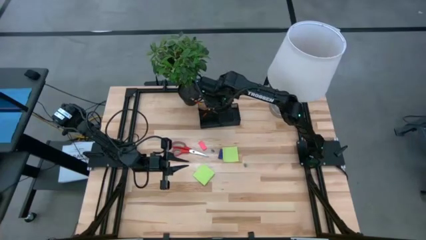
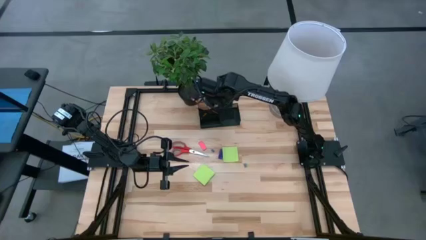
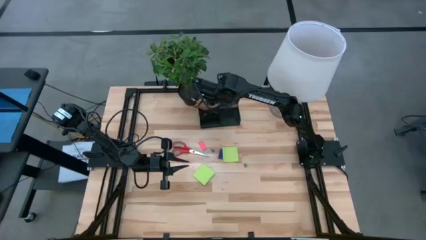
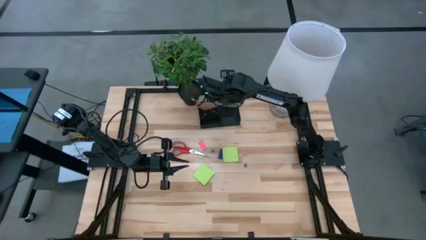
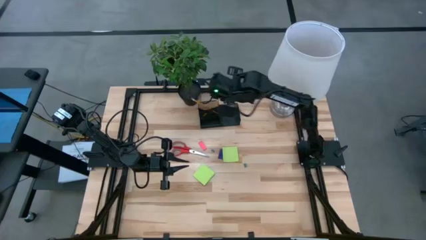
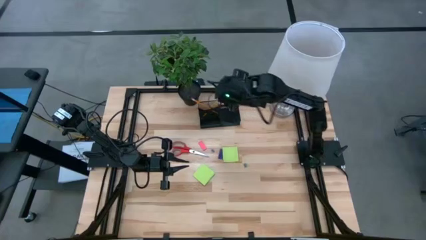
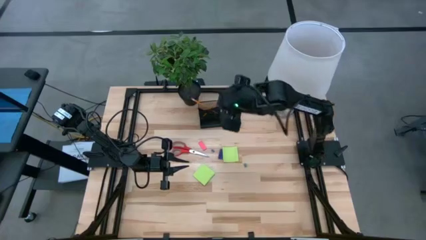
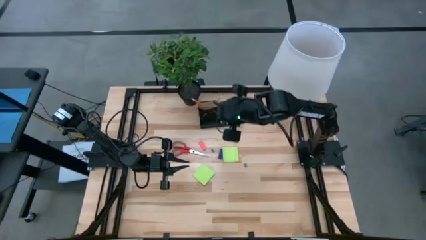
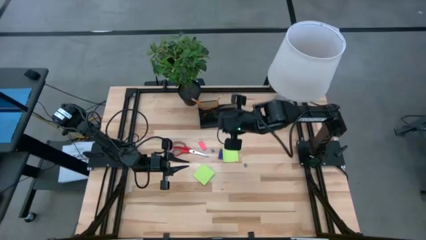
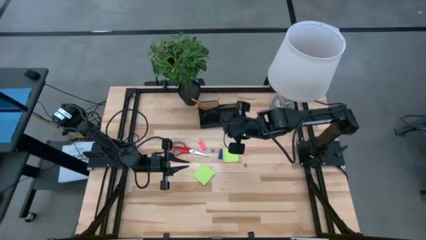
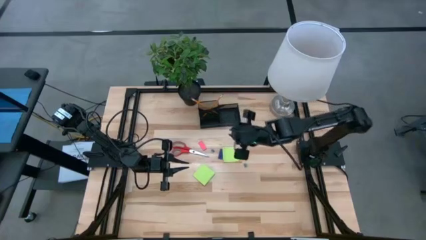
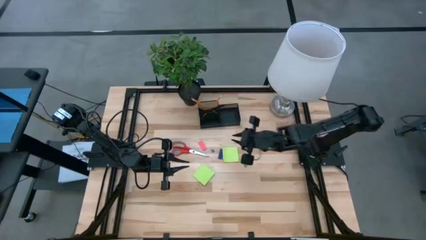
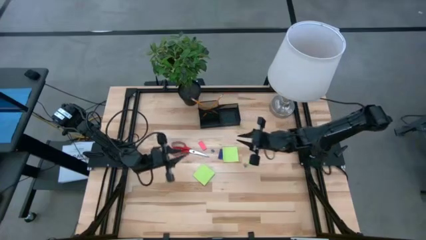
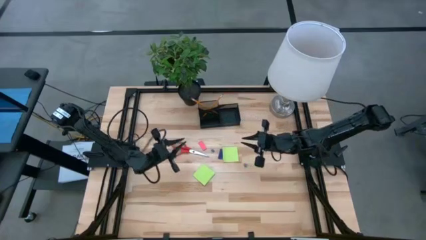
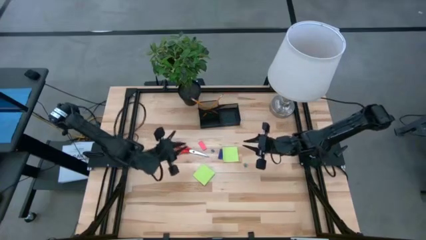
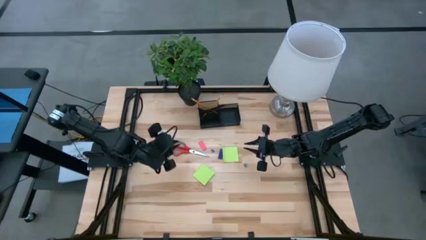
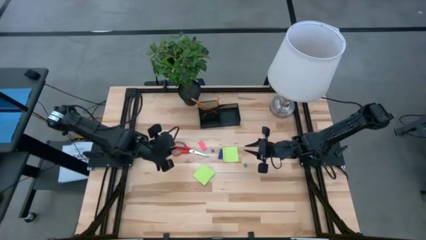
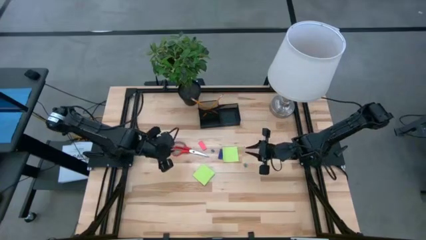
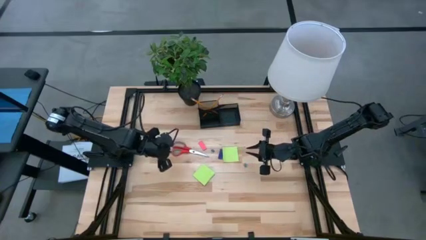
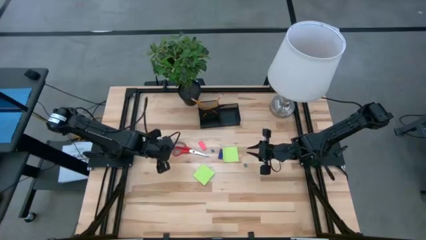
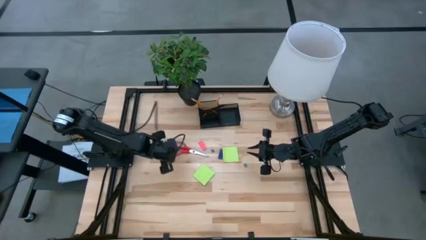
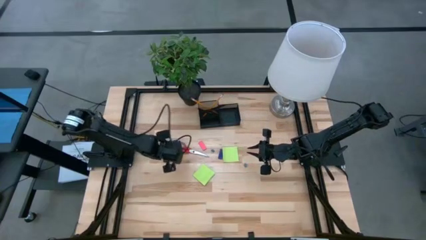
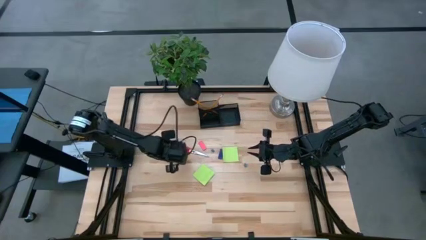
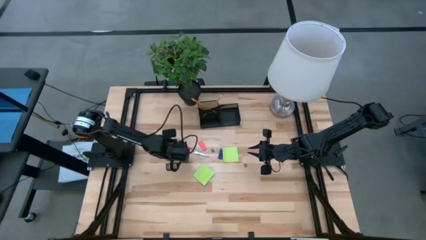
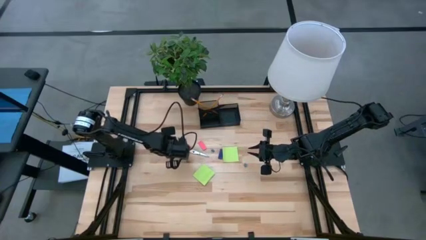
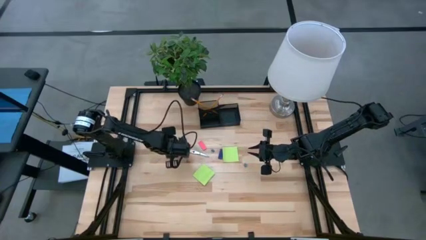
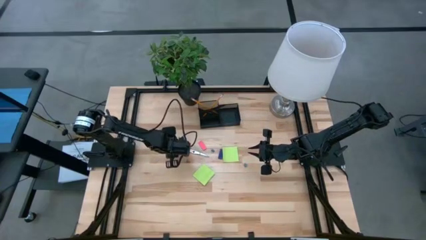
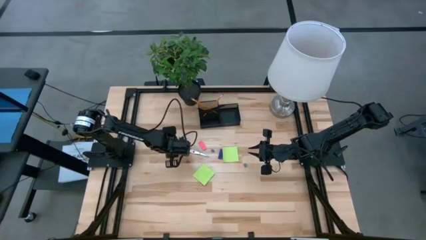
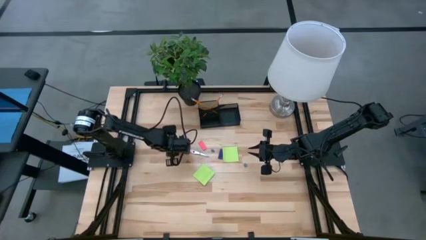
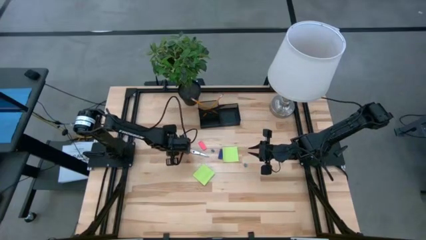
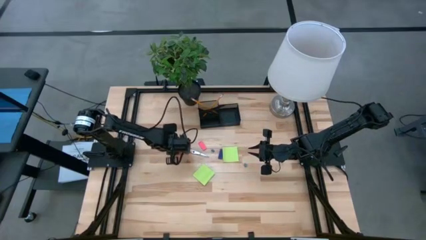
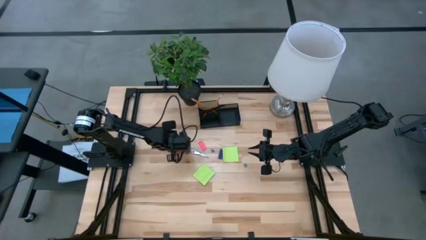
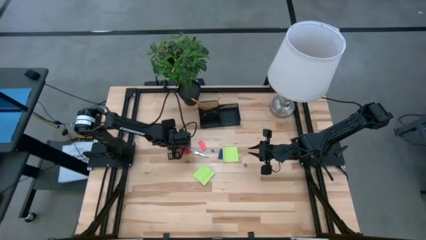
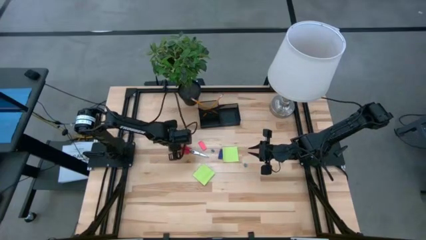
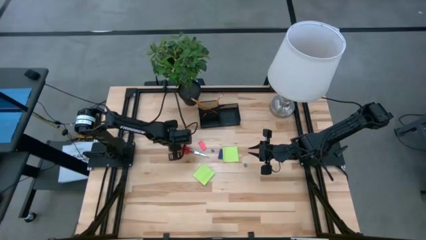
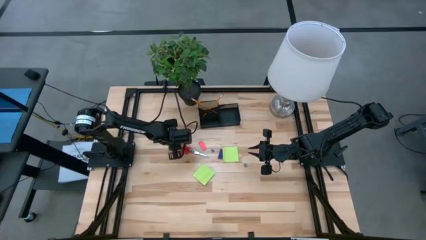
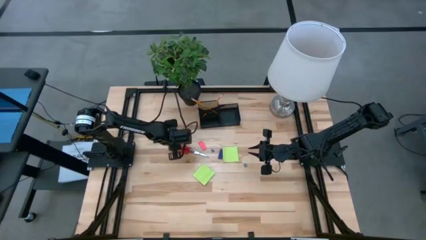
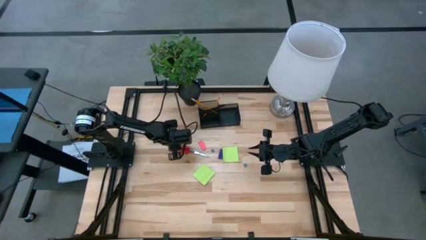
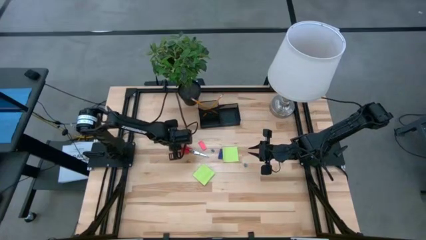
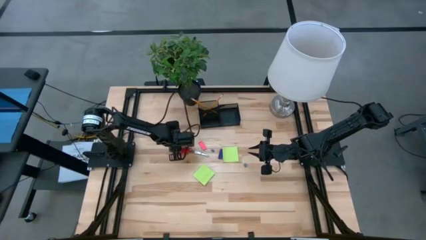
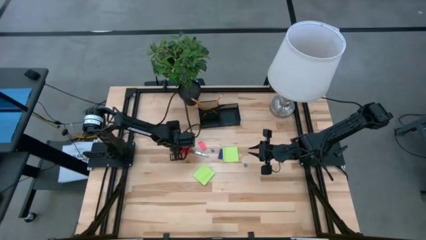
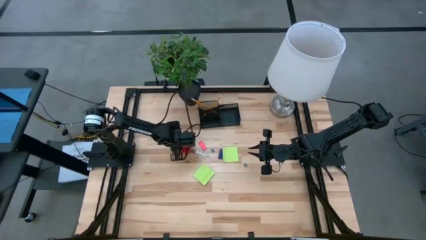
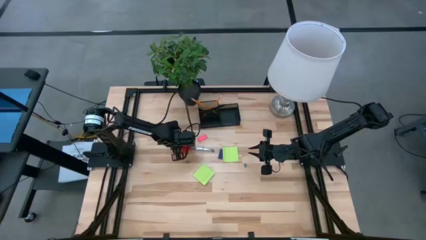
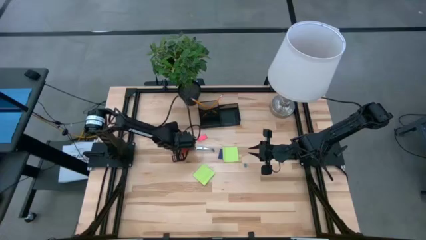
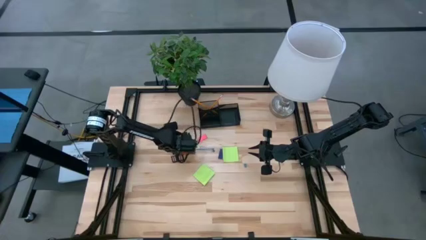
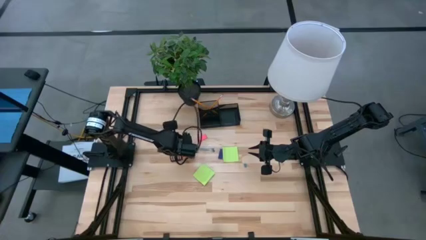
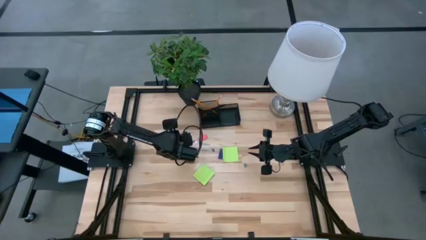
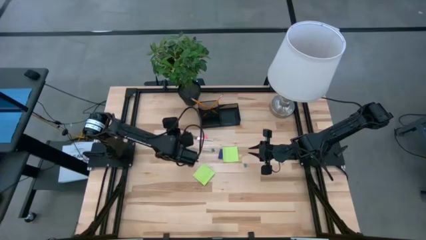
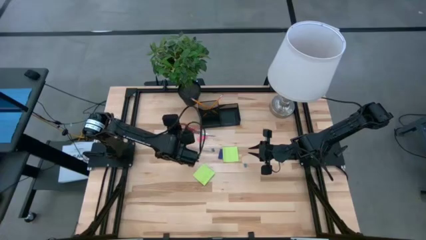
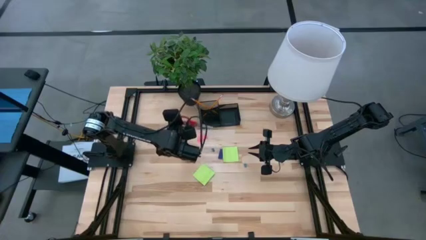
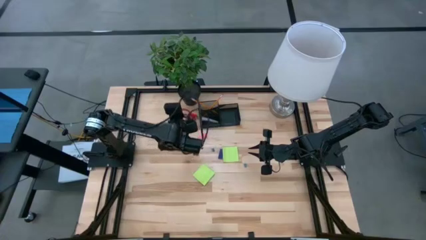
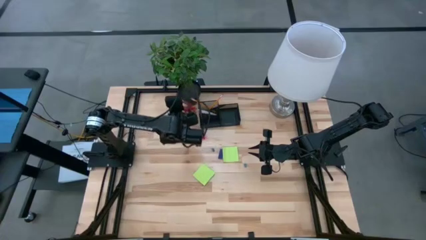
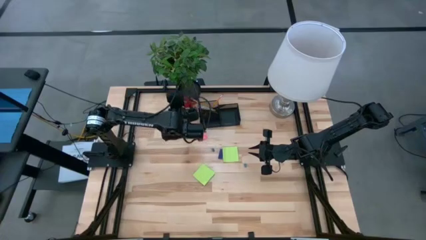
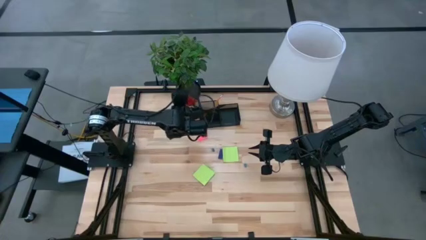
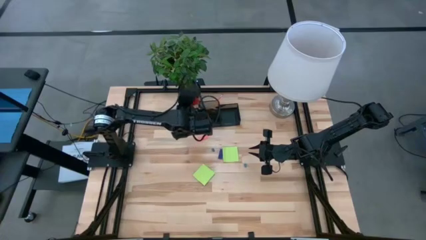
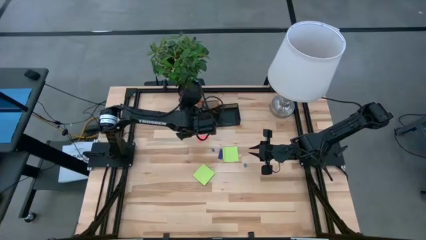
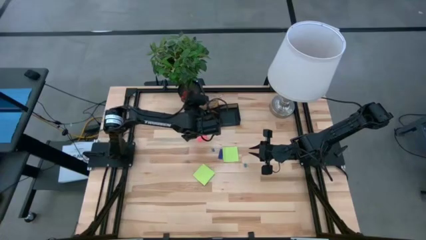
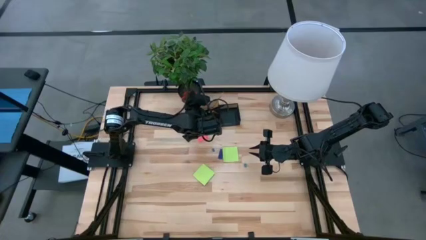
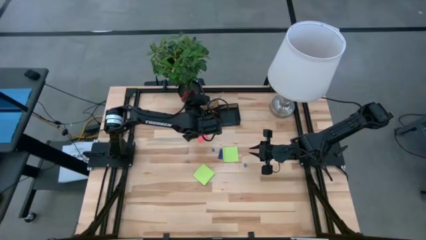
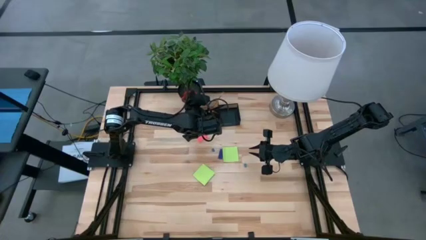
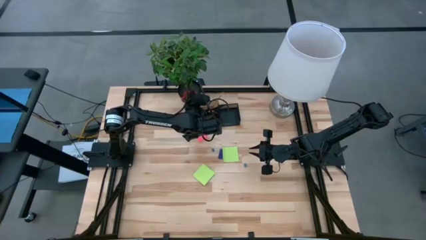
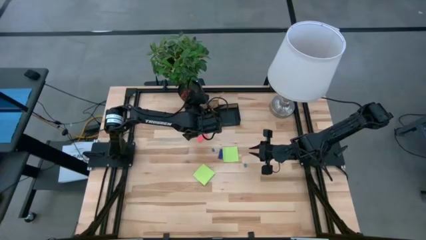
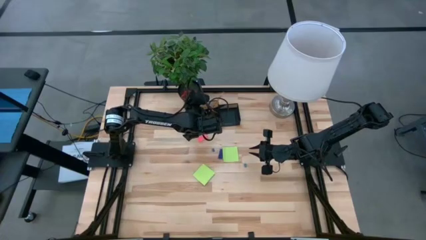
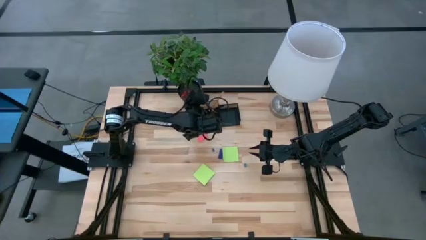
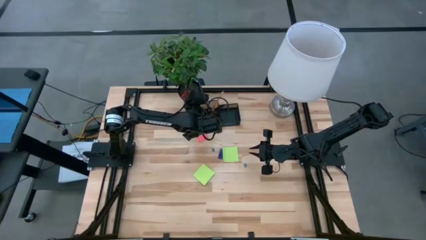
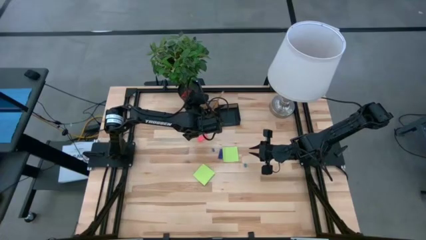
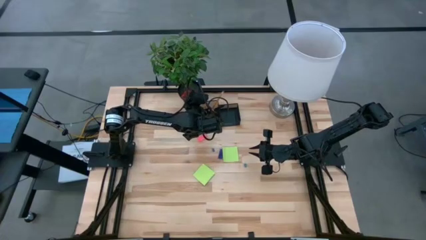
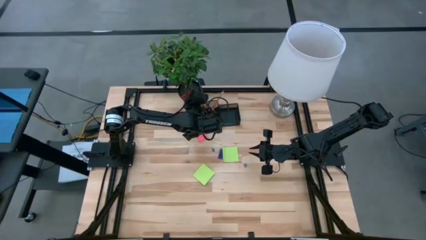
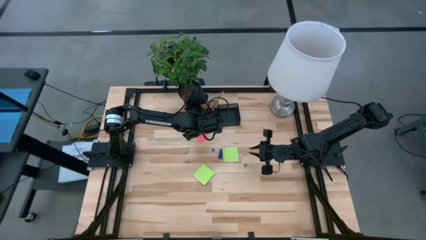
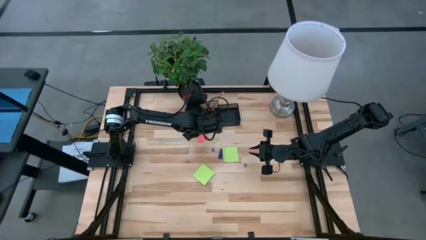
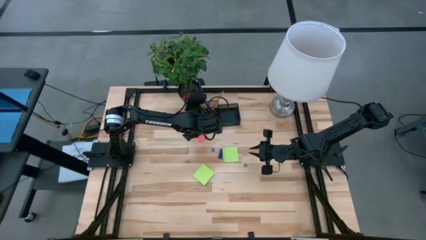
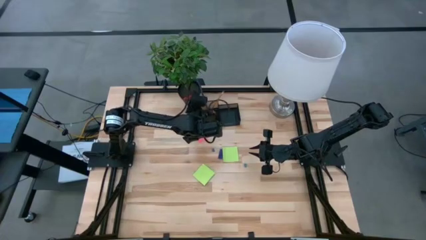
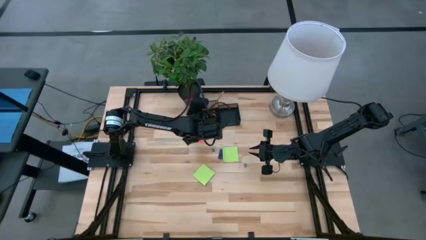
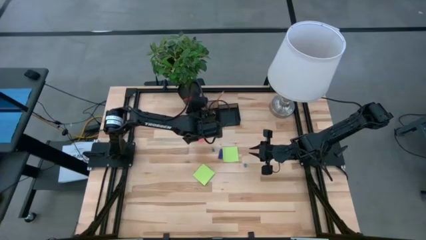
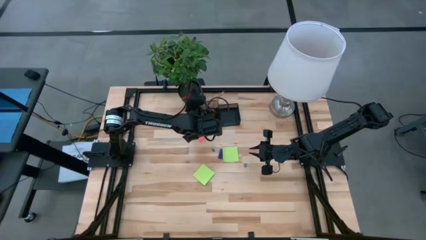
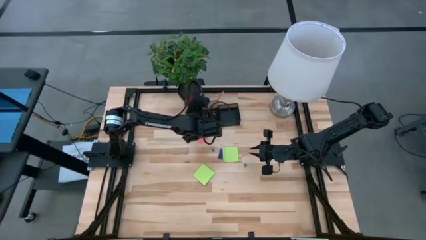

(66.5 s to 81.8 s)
Task: Pick and place office supplies into organizer
Put the red scissors into the desk organizer
